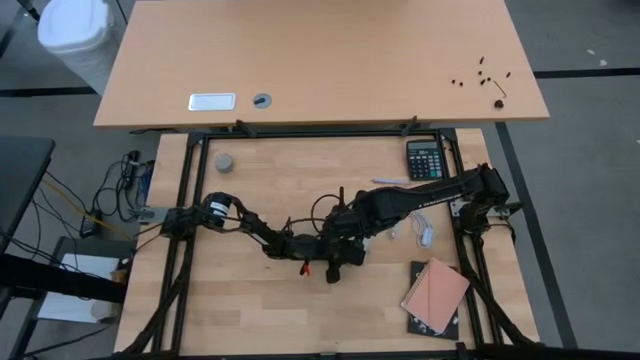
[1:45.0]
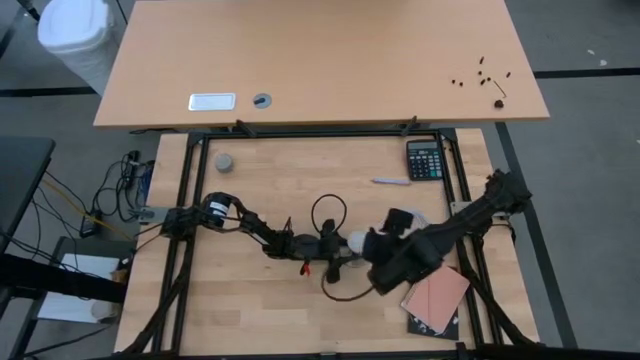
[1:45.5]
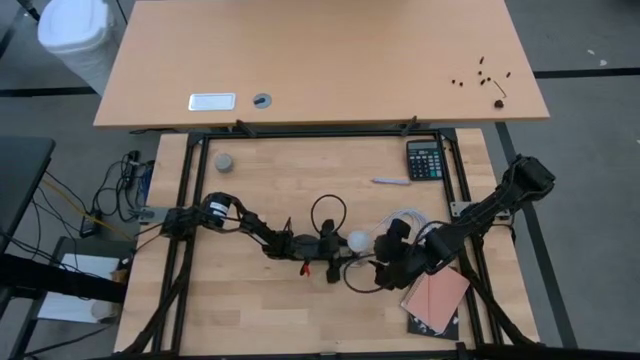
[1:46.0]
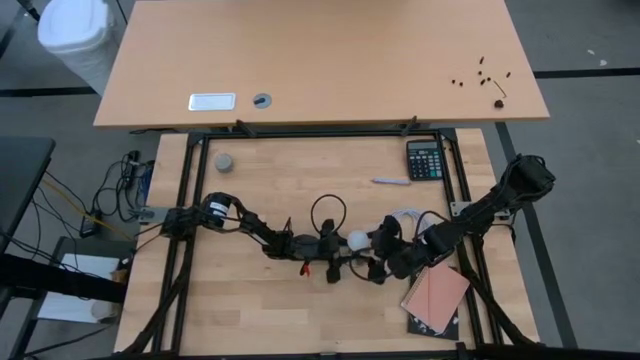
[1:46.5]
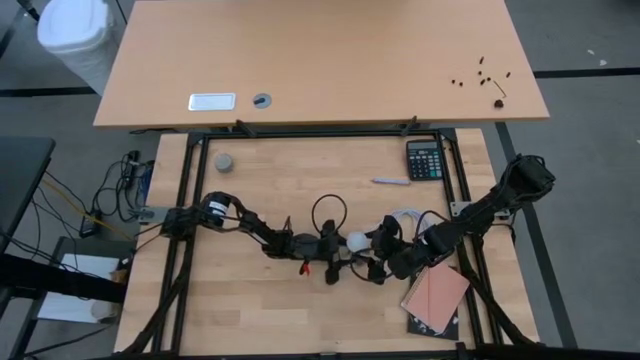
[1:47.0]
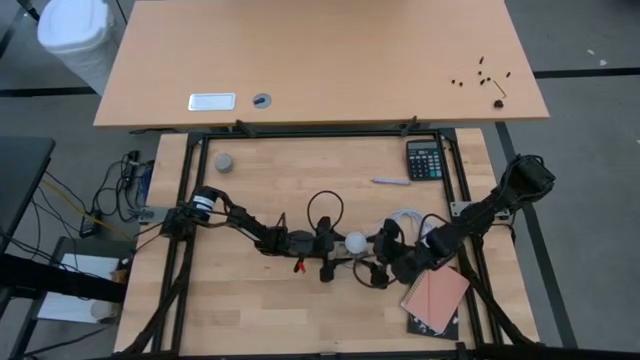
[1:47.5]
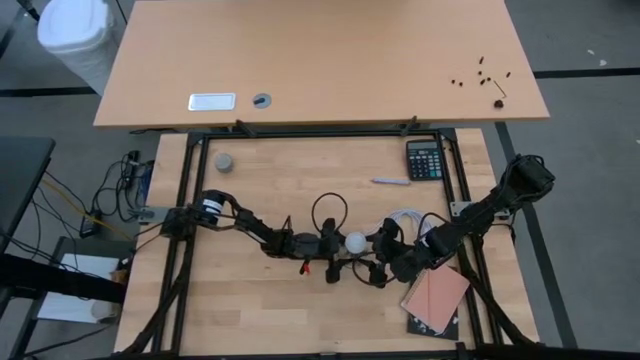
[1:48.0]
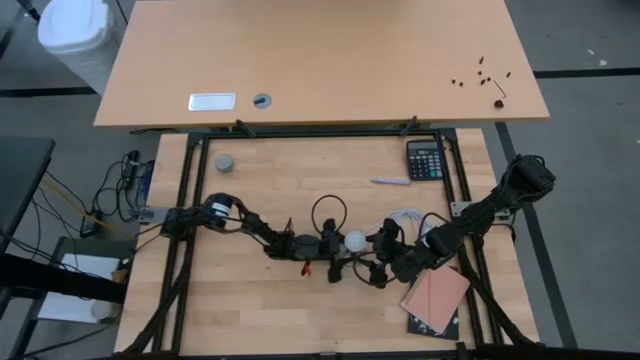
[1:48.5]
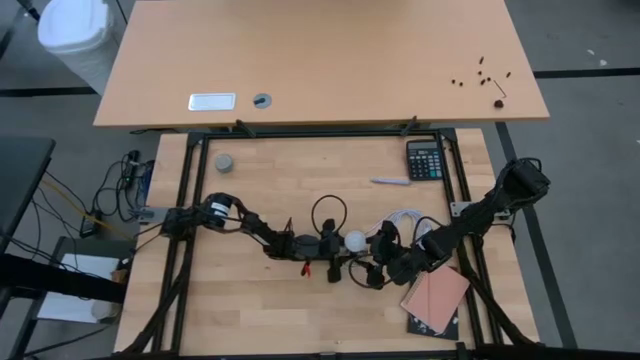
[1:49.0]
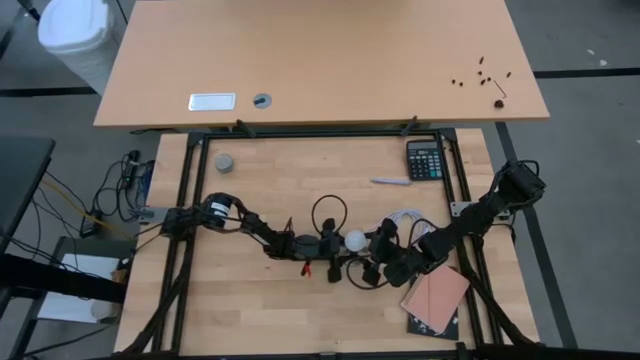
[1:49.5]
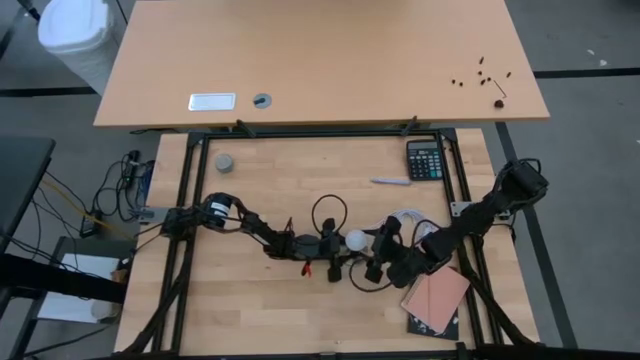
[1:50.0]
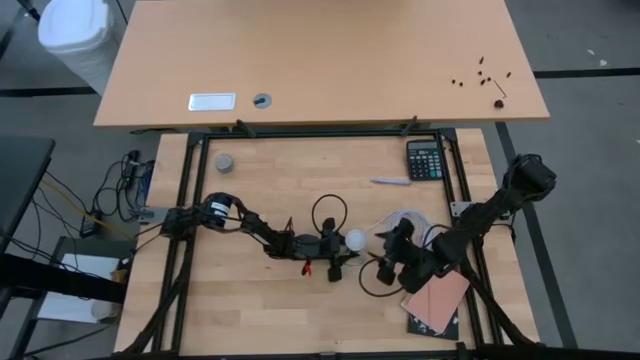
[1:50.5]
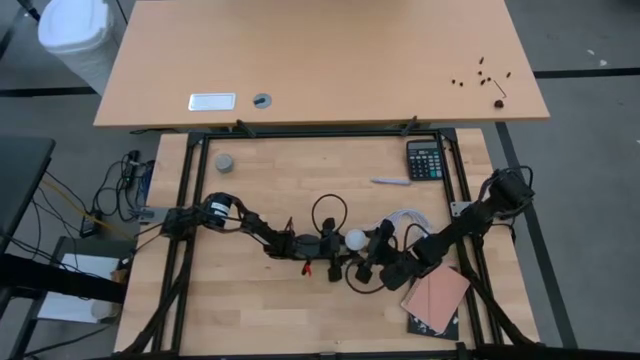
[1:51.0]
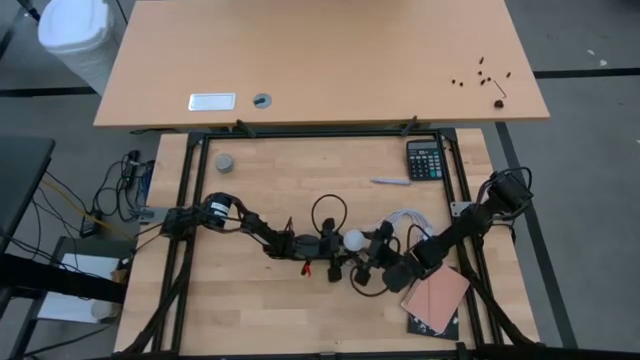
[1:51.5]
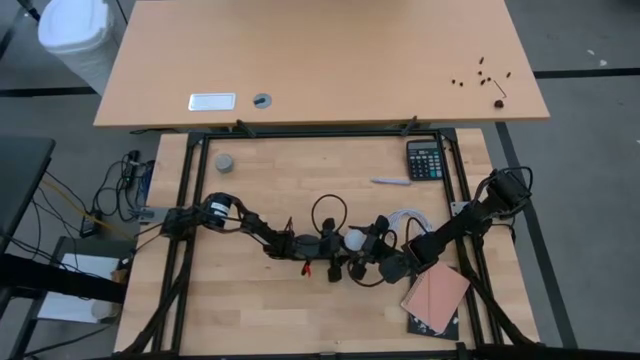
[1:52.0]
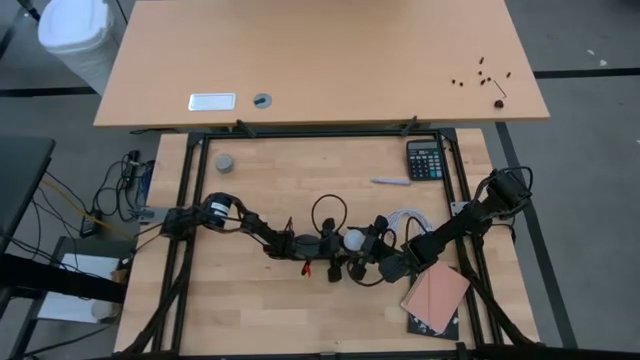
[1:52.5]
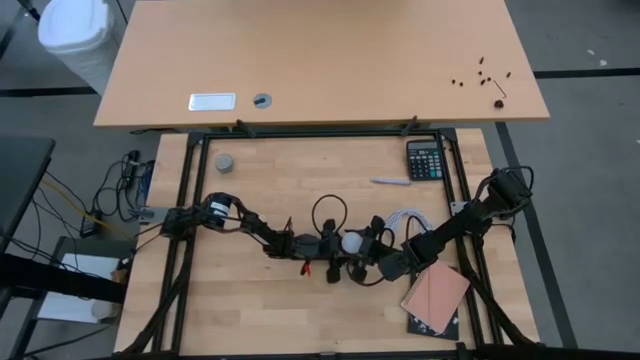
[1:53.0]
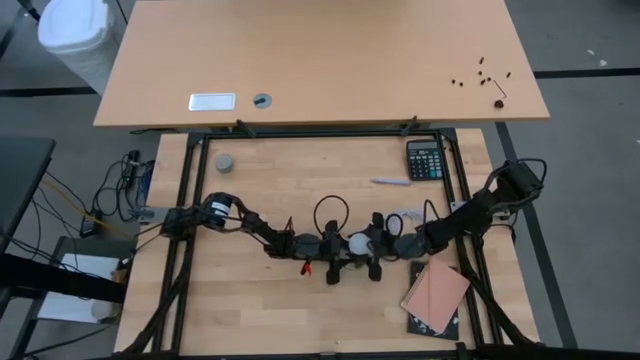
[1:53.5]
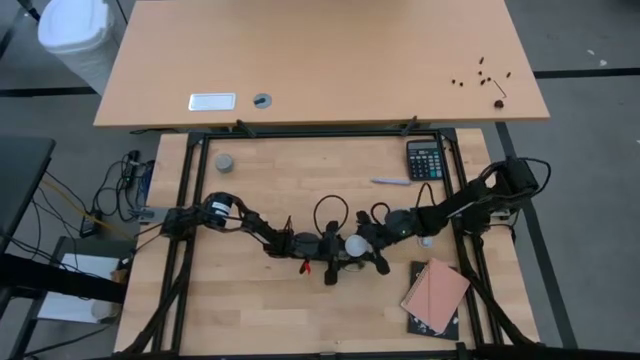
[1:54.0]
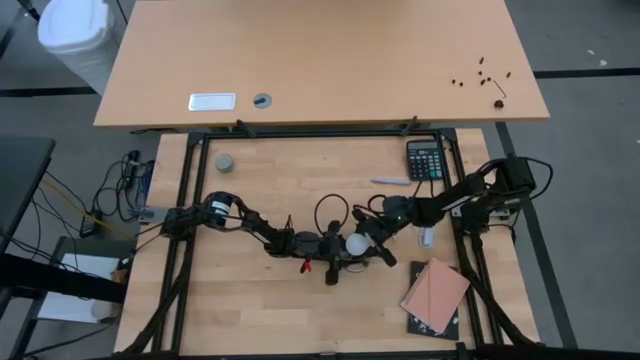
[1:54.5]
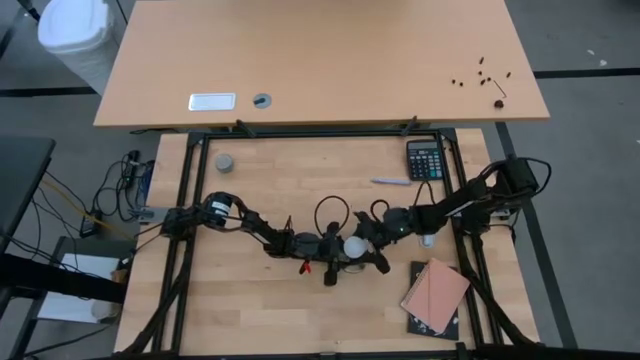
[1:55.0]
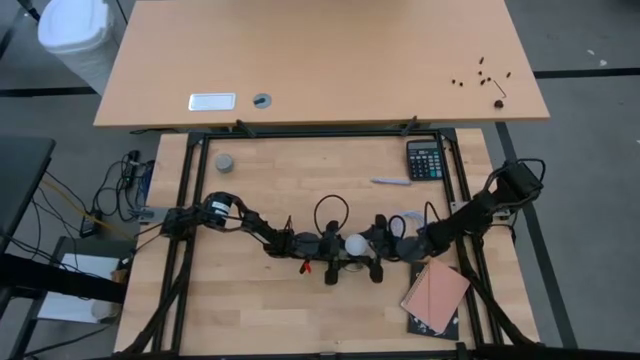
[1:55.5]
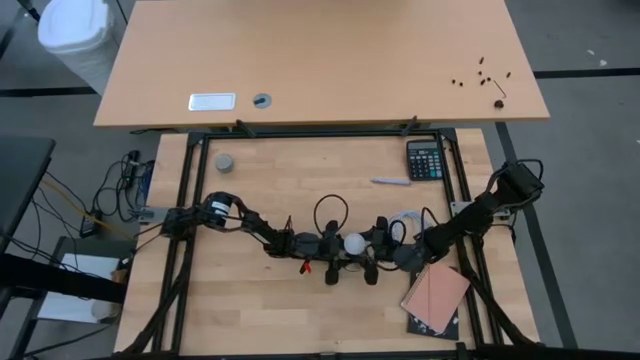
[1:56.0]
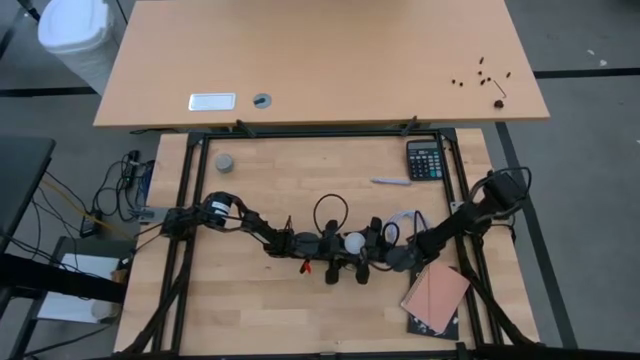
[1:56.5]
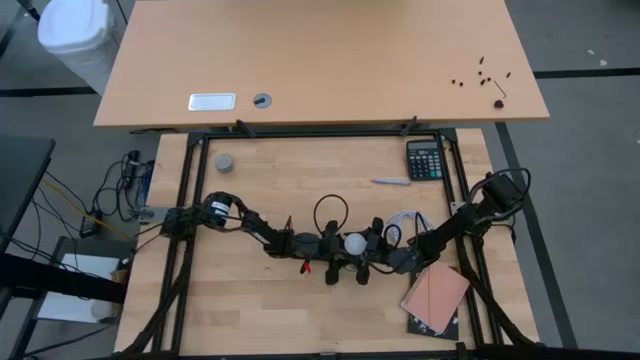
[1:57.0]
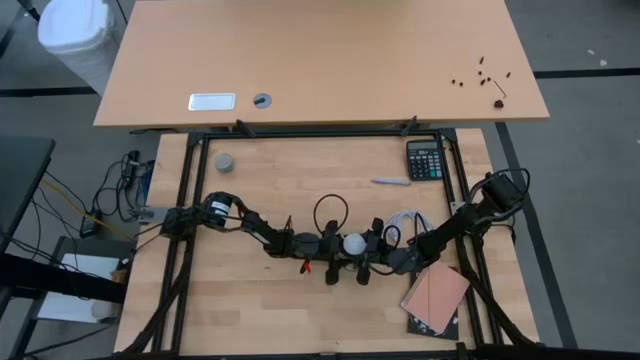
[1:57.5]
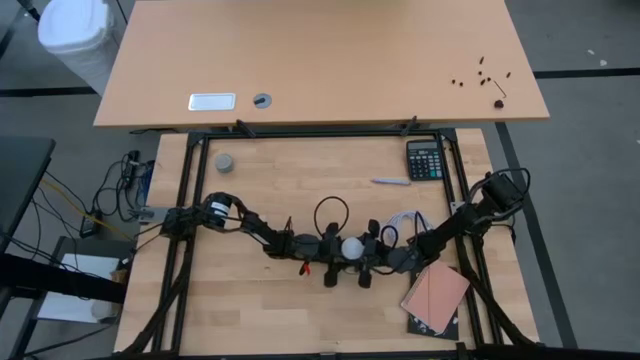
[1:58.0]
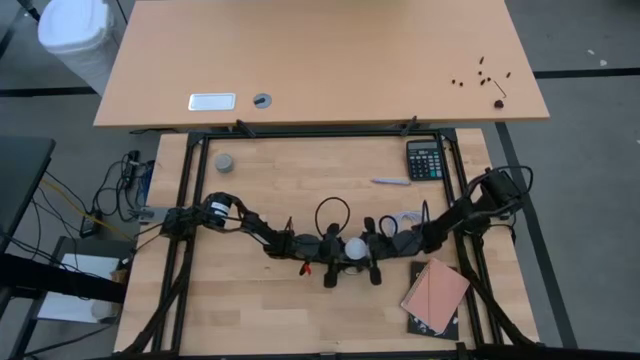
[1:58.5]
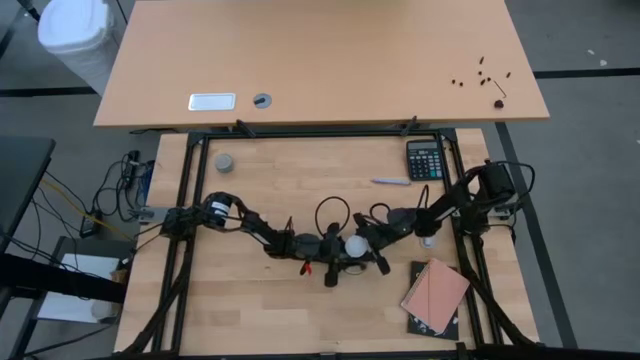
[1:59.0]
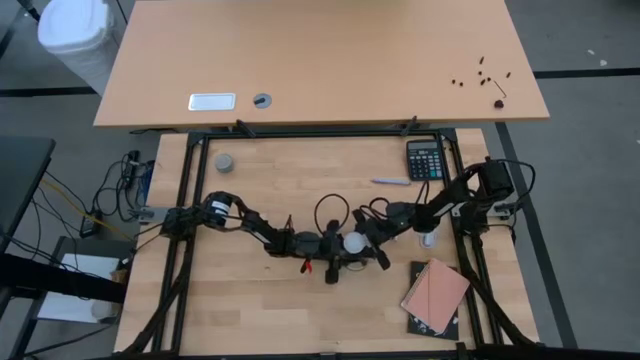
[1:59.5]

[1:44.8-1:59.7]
Task: Screw lightbulb
Remove the lightbulb from the bronze lamp socket

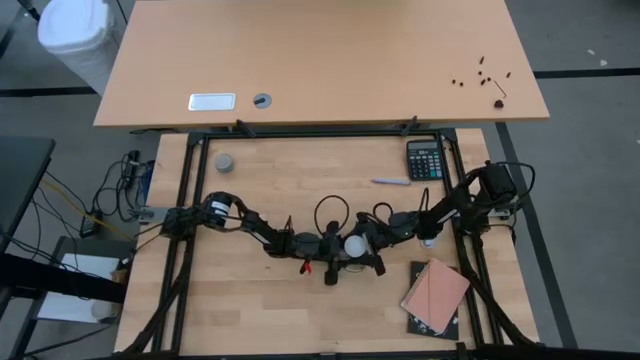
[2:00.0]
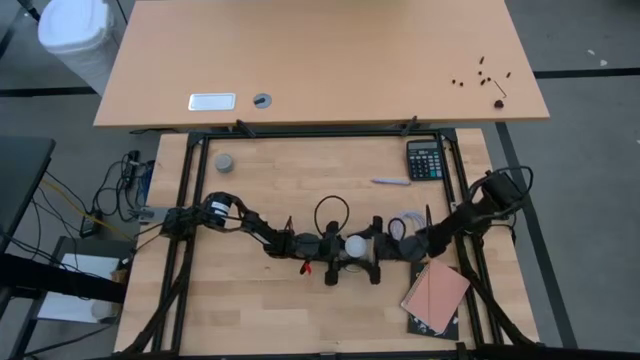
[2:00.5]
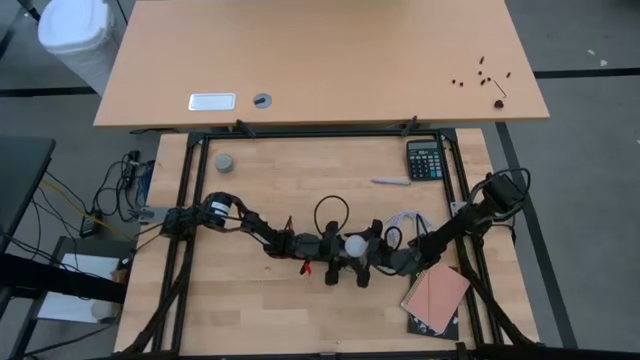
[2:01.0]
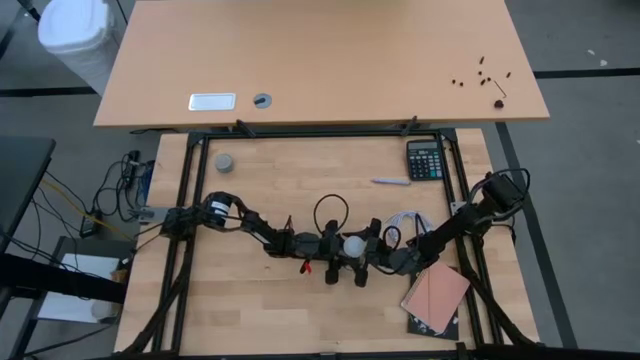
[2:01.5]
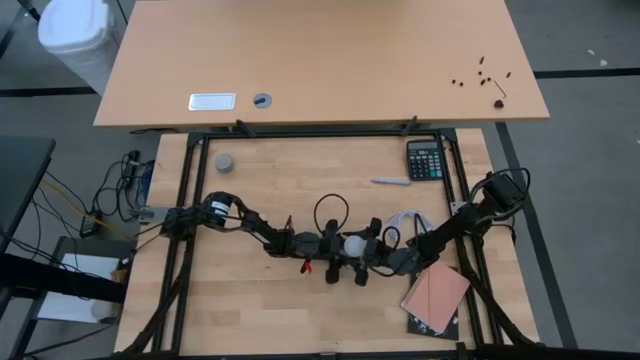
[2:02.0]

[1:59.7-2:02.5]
Remove the lightbulb from the bronze lamp socket

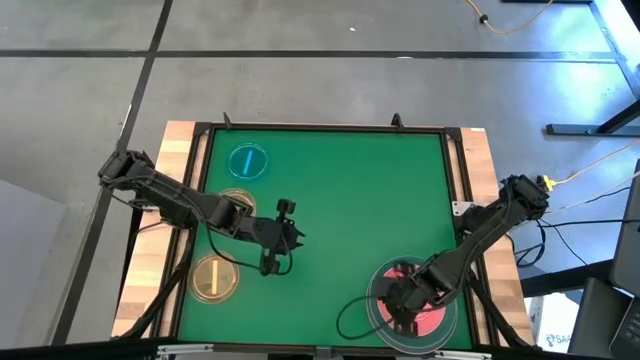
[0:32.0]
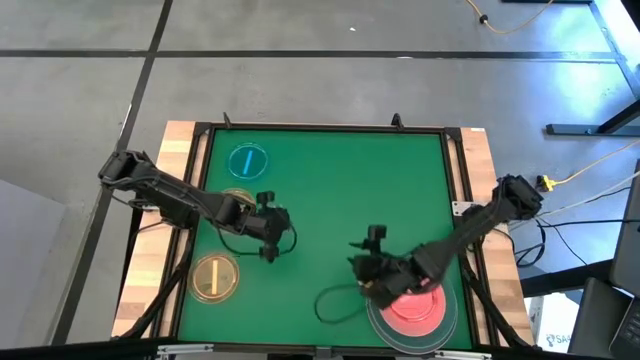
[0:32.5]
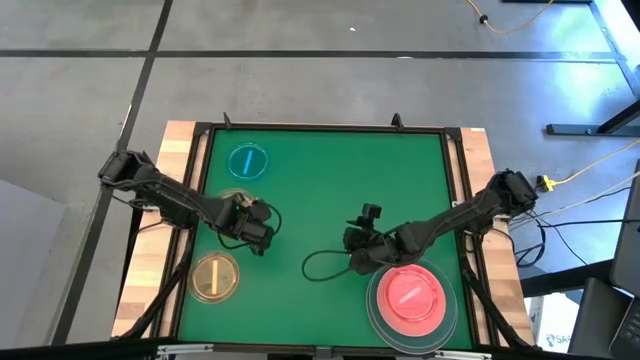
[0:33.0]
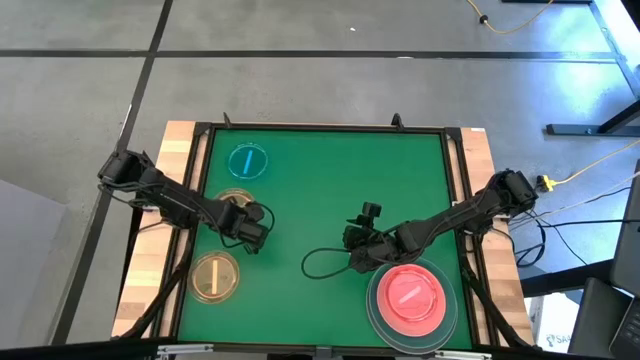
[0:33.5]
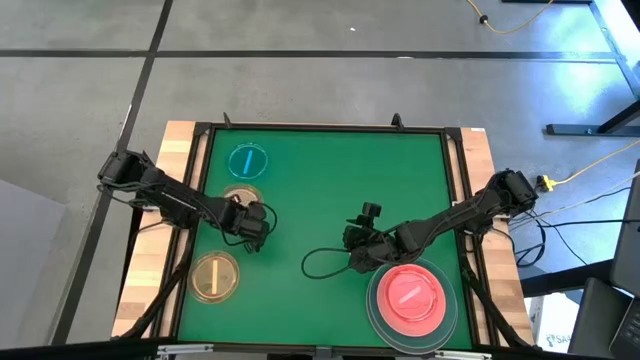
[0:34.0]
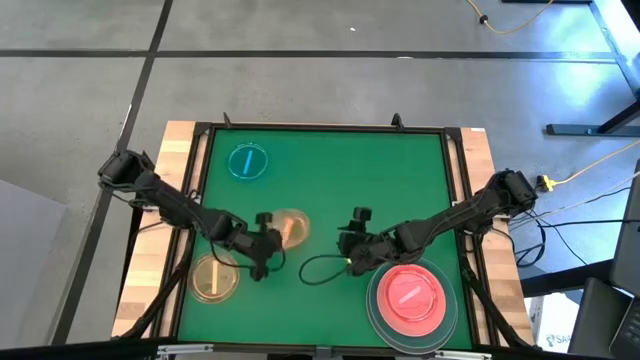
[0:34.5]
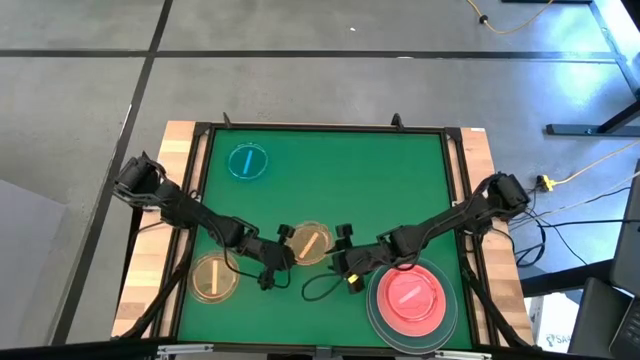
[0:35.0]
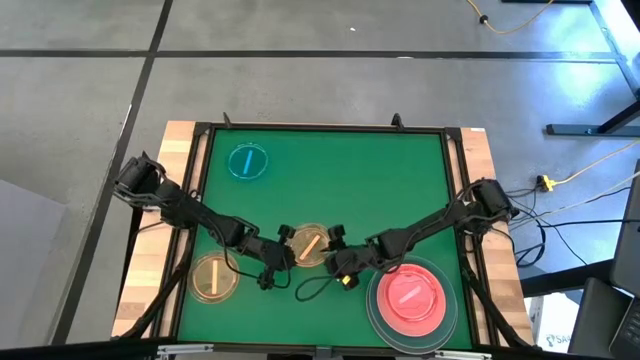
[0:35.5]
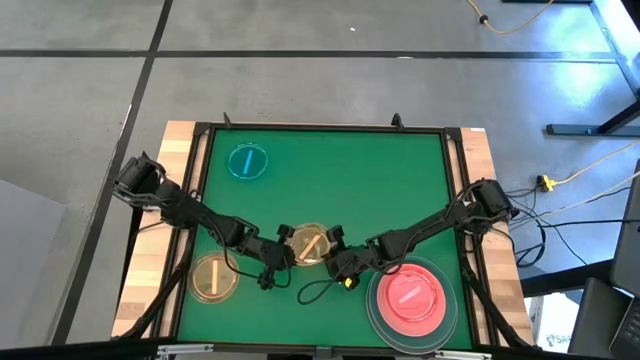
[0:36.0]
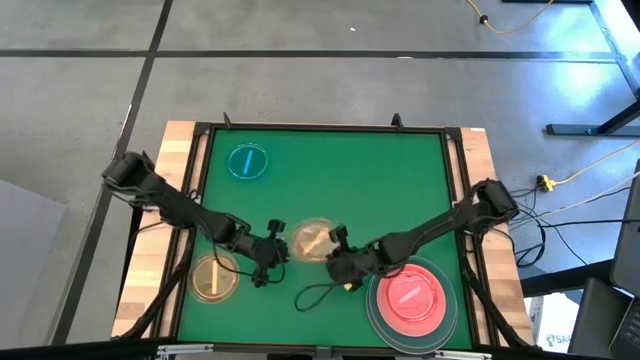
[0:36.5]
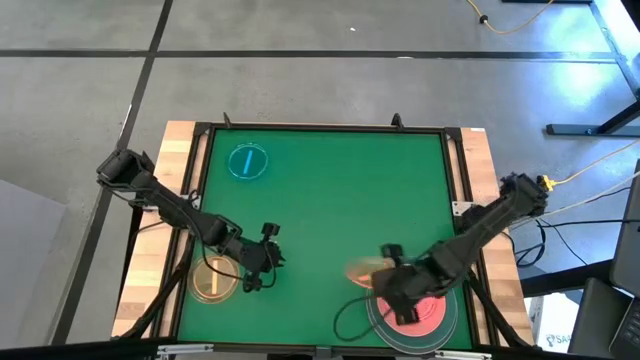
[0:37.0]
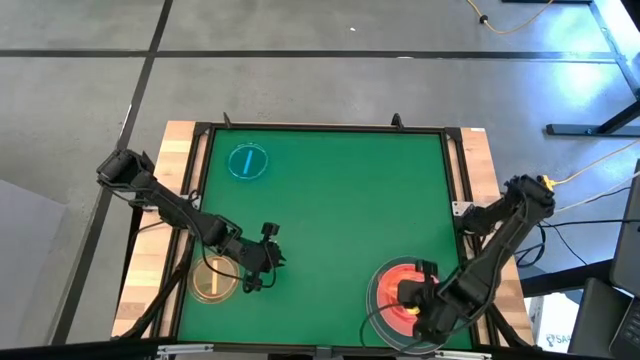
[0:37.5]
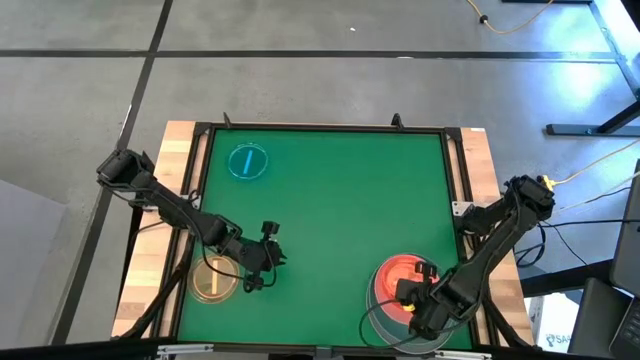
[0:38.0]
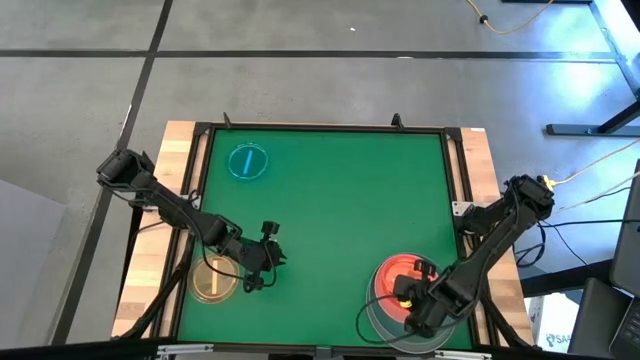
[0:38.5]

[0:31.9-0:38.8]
Task: Stack plastic plates
Stack the top transparent orange plate on top of the transparent red plate
